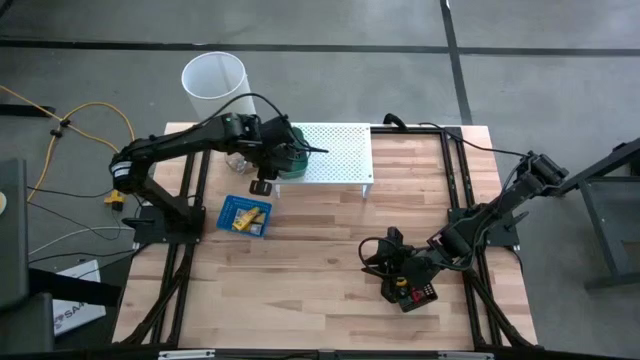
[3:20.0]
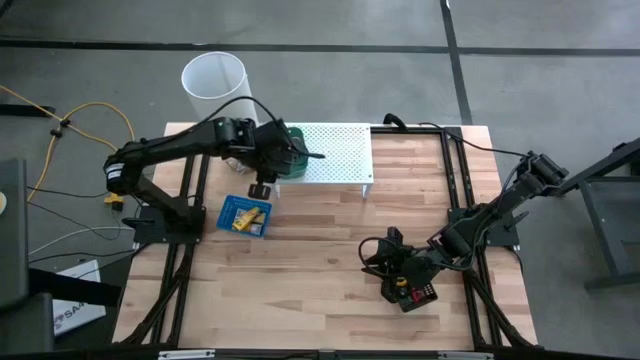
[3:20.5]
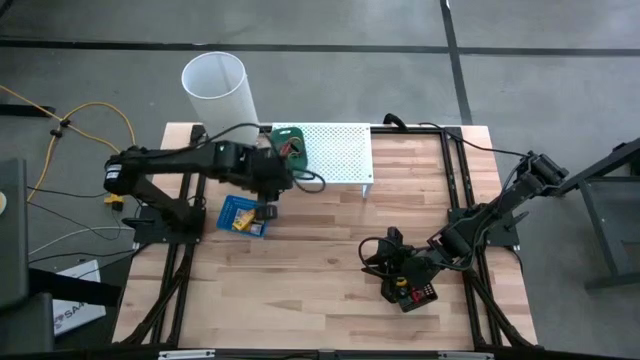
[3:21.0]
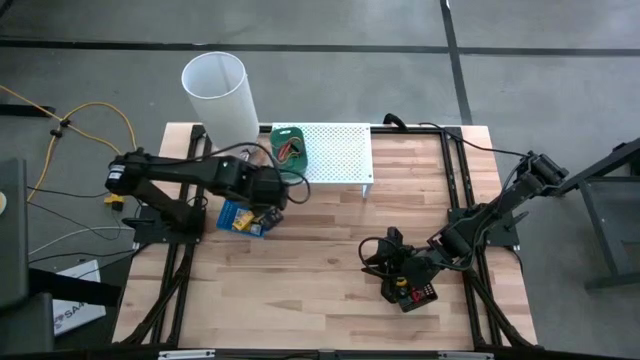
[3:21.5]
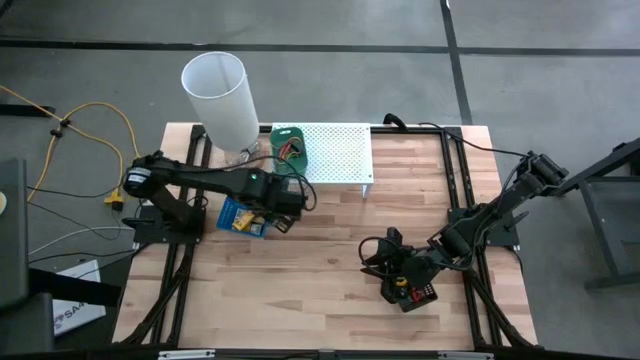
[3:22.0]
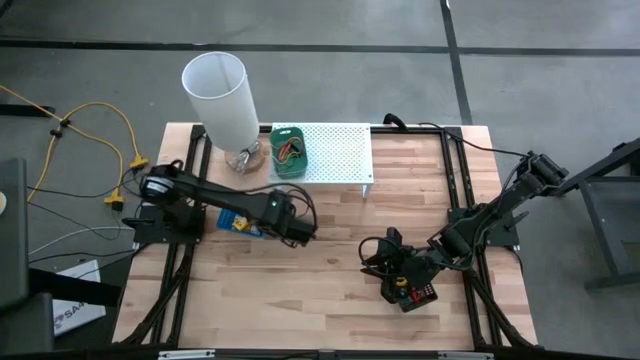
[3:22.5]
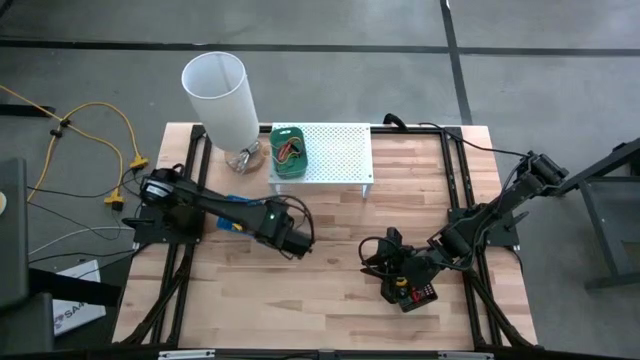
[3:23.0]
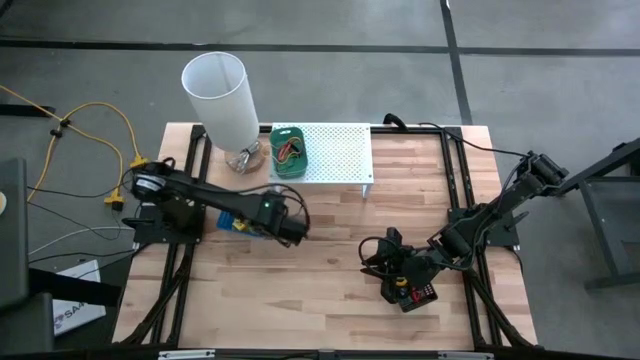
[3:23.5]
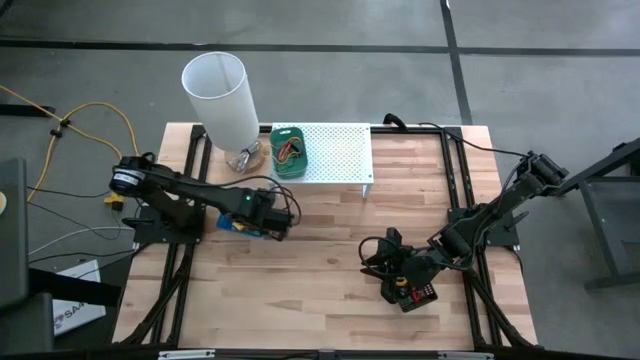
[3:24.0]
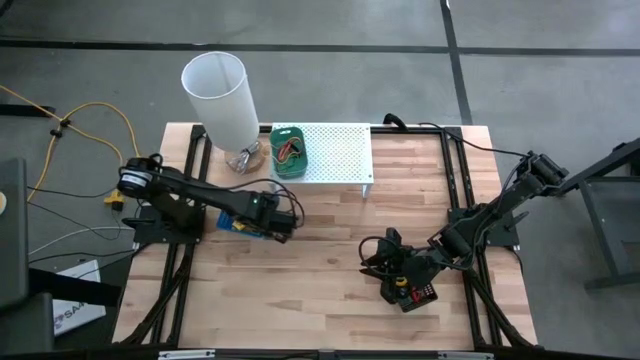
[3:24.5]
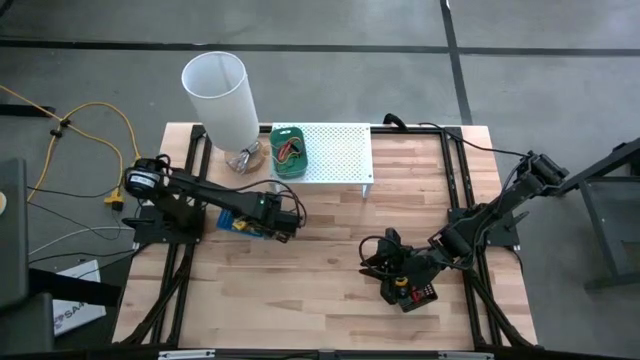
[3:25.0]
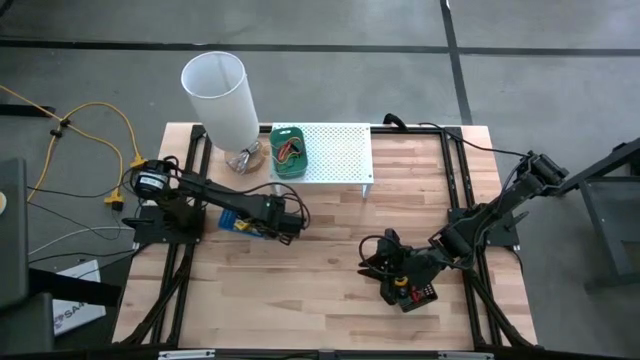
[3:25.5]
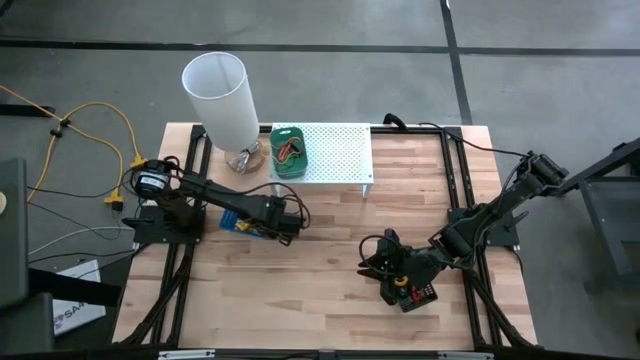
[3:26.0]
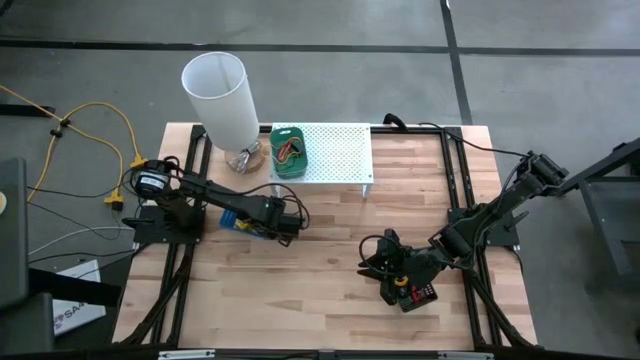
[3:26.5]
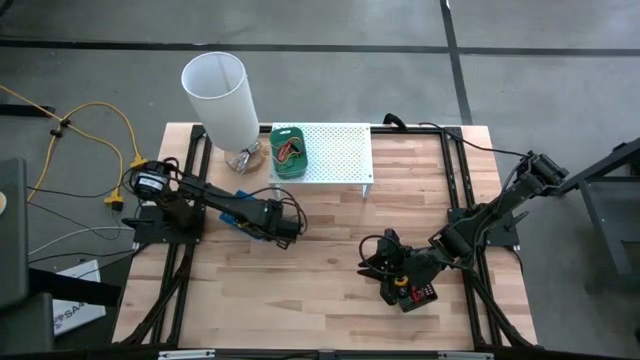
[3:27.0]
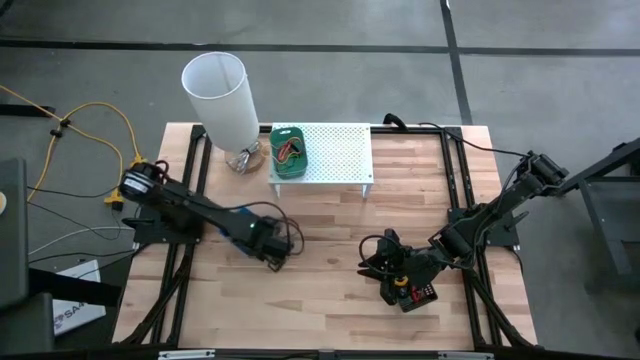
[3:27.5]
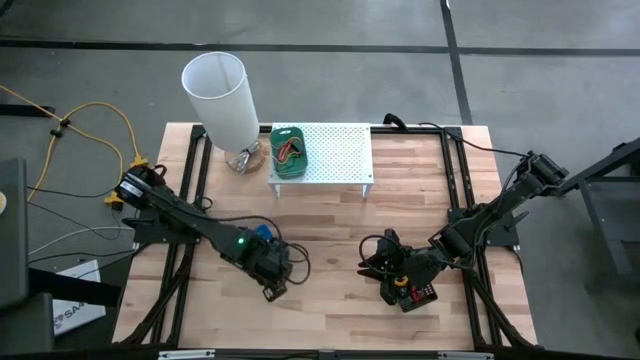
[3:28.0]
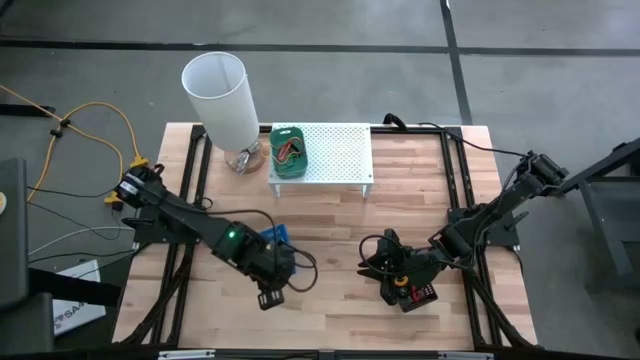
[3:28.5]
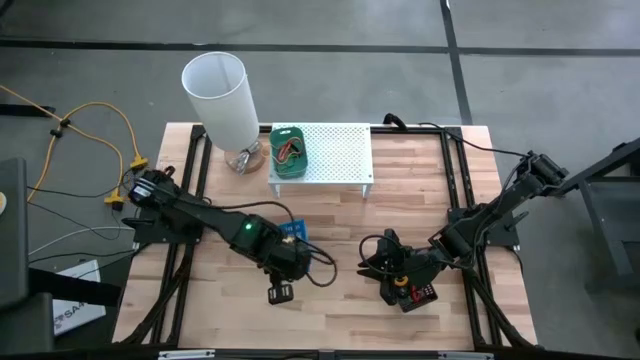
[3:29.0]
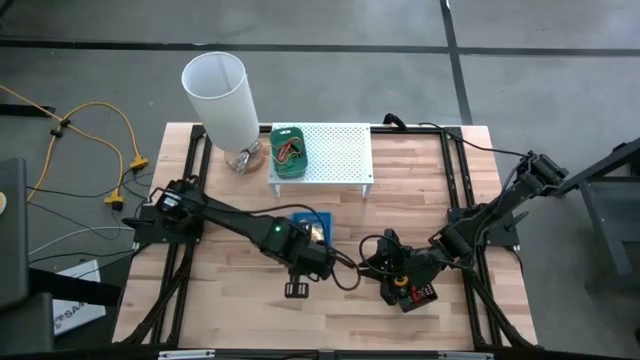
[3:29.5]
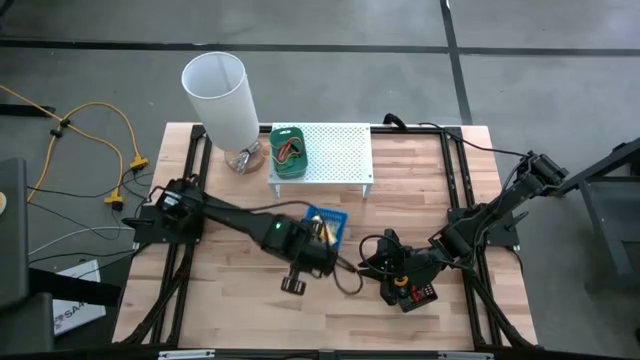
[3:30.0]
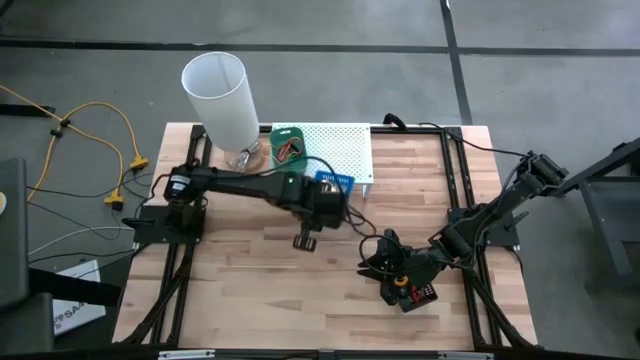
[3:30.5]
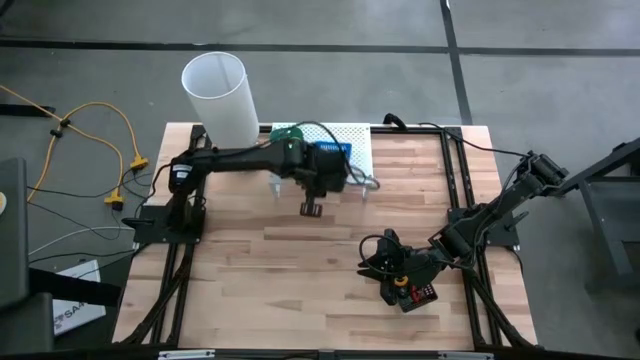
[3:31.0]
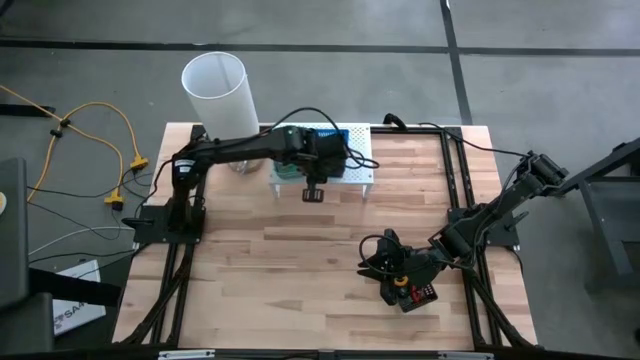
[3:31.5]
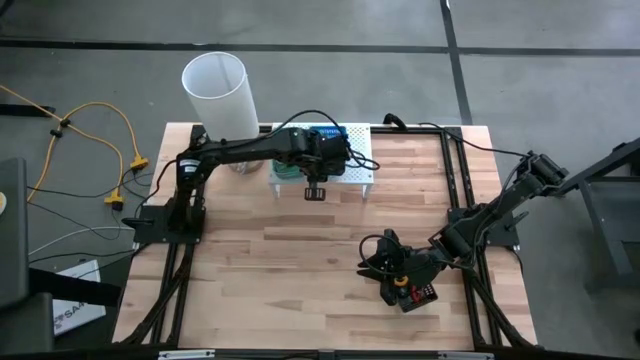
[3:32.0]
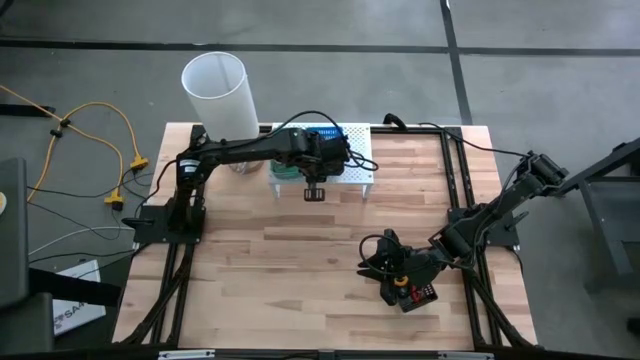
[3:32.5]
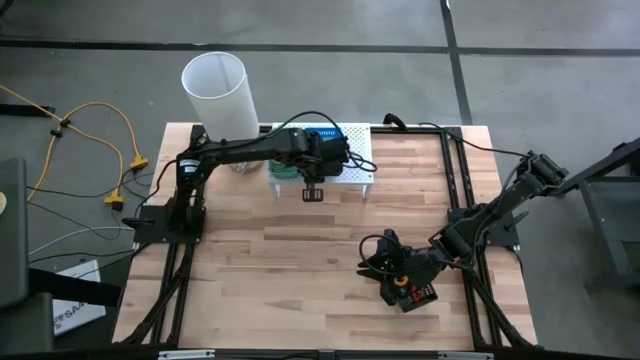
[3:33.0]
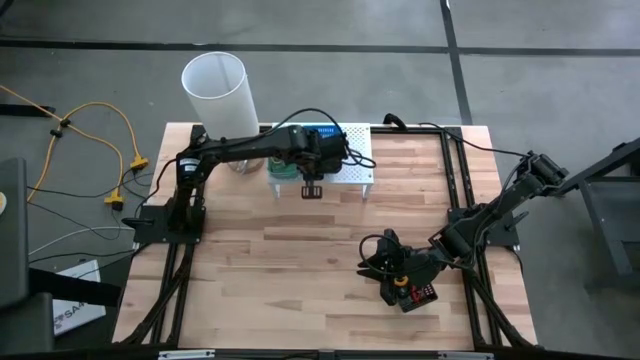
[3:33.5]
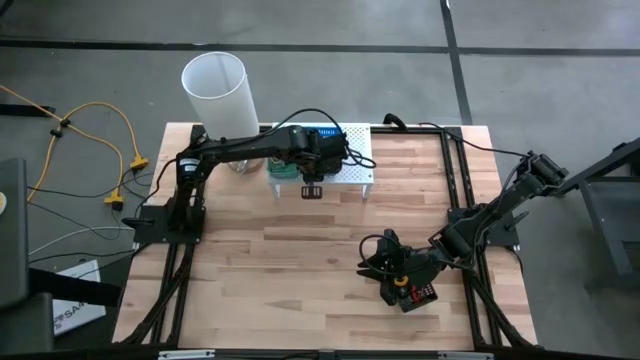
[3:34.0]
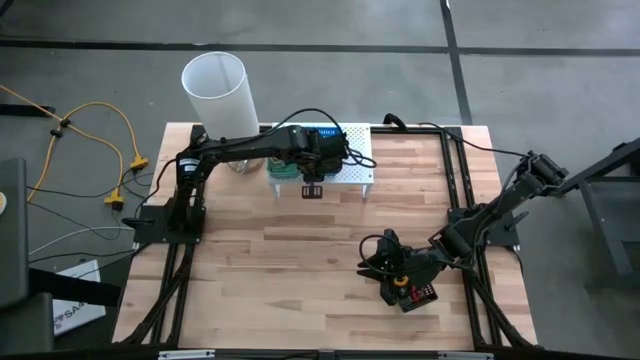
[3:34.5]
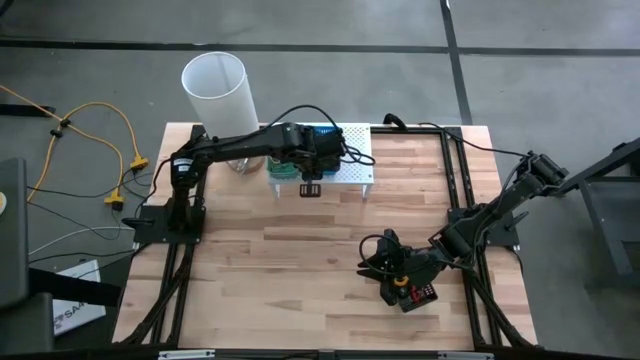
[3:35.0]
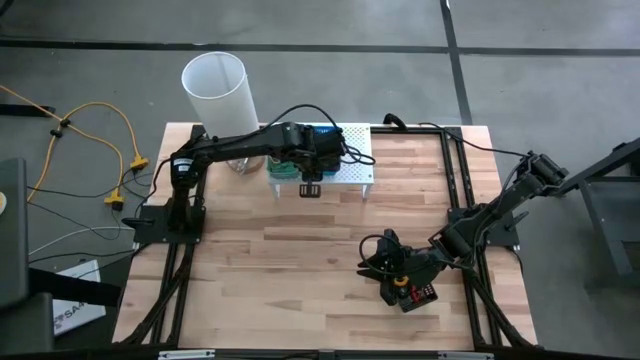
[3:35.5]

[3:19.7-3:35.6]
Task: Pick & Place Office Desk Supplies
Put the blue bin with yellow crayon box on the shelf

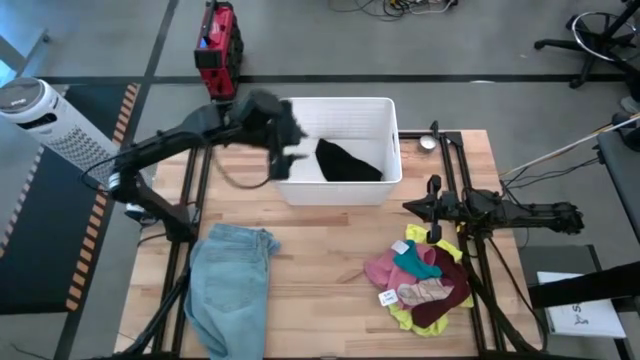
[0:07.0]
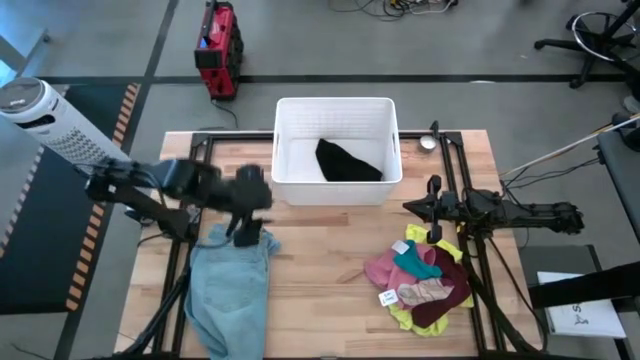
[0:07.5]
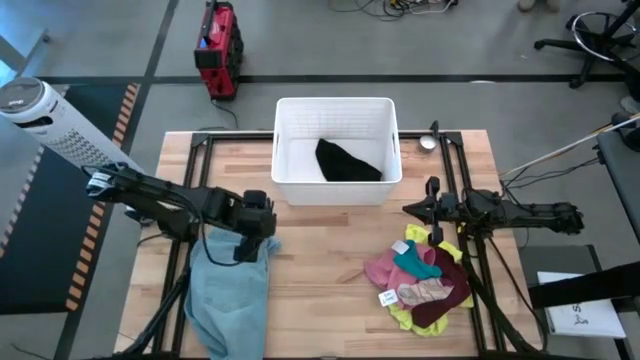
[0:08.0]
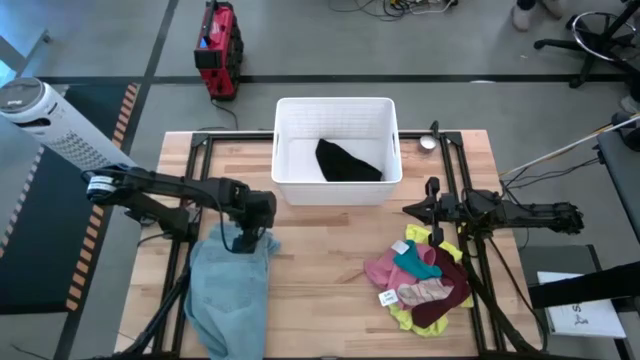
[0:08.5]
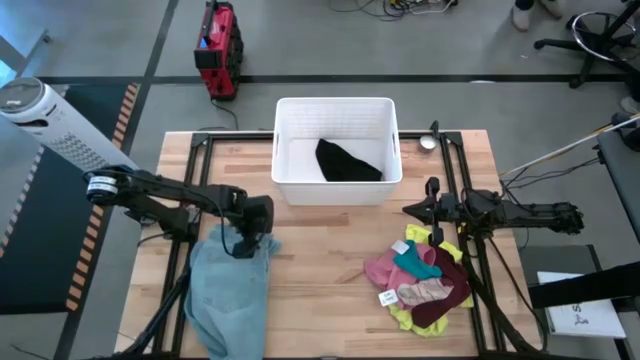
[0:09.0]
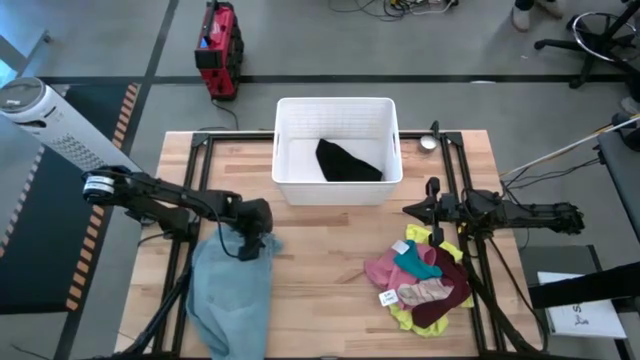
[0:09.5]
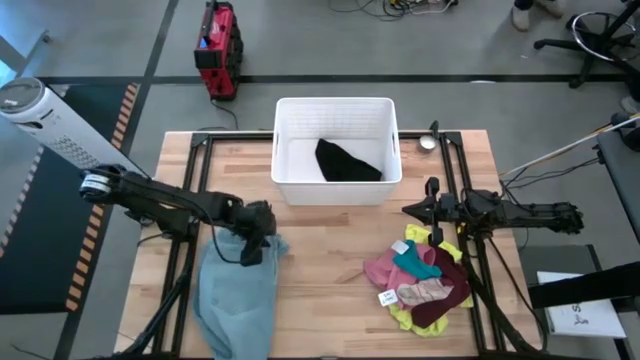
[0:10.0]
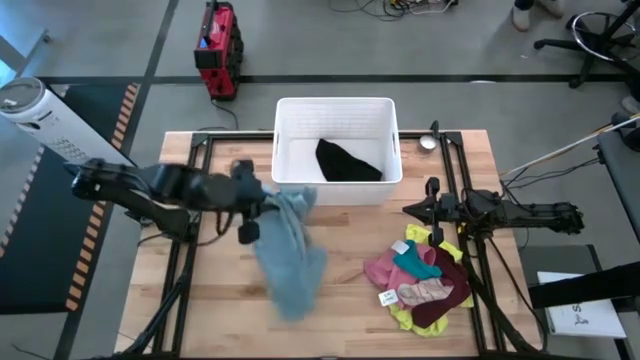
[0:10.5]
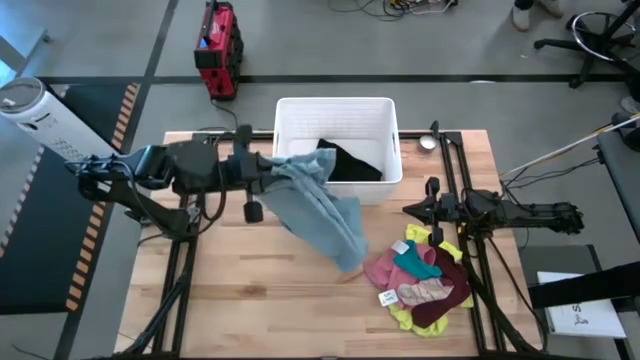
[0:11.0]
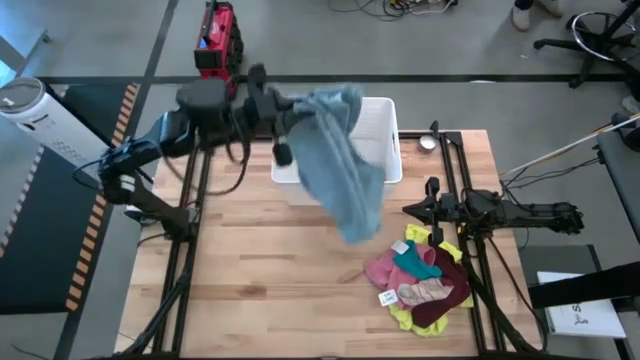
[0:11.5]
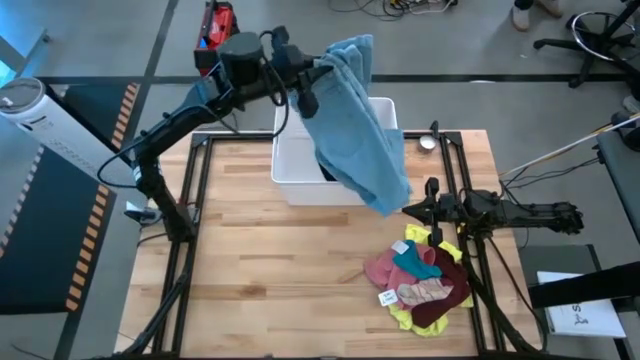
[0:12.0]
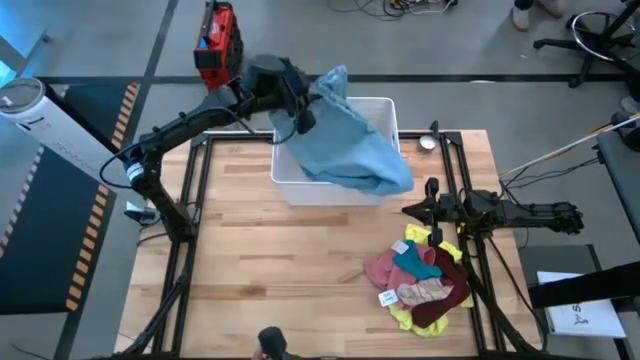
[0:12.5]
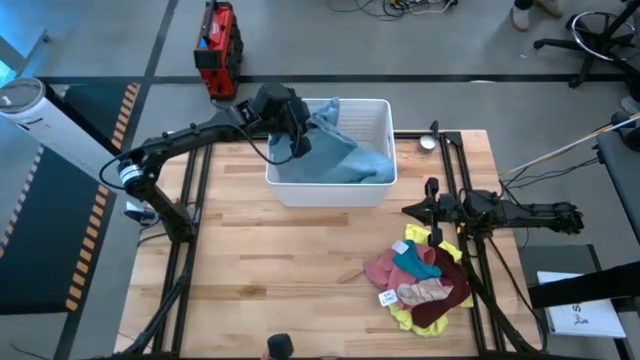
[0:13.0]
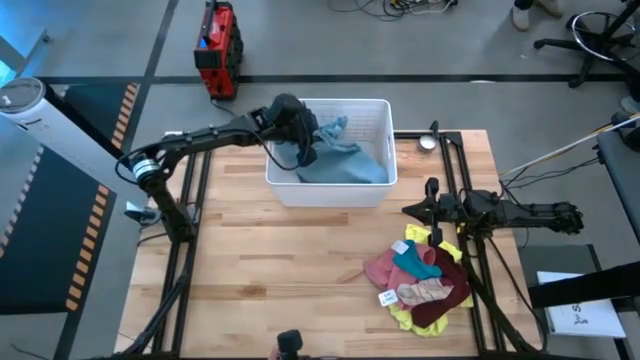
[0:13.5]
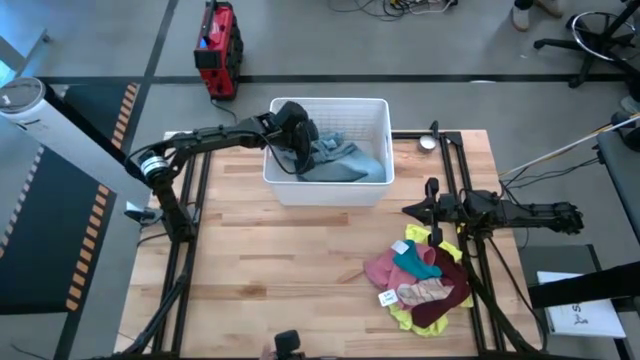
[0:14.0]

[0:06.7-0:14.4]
Task: Sort clothes
Put the blue jeans into the white laundry bin
